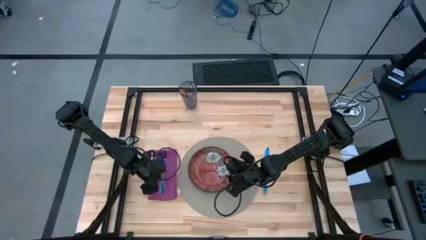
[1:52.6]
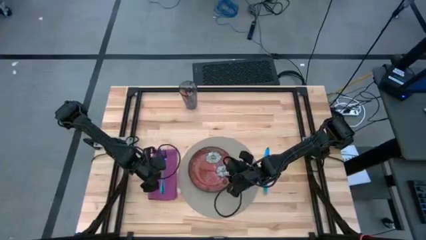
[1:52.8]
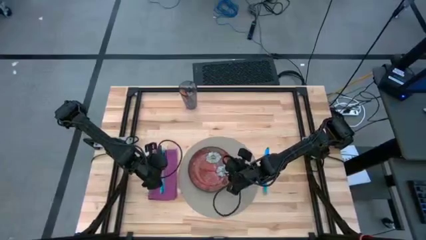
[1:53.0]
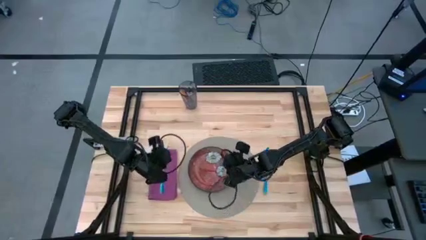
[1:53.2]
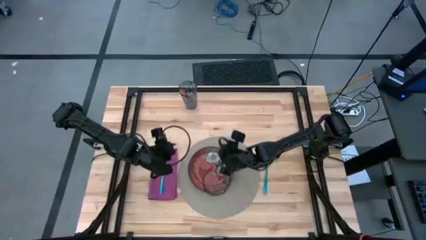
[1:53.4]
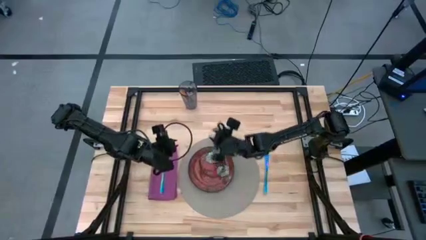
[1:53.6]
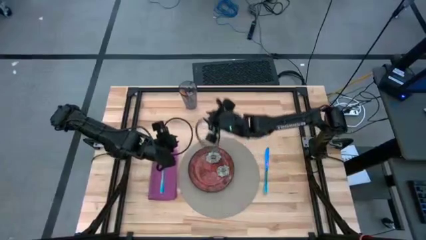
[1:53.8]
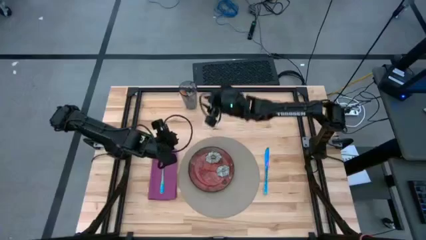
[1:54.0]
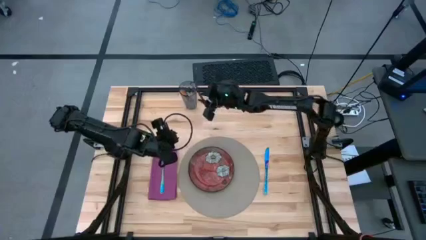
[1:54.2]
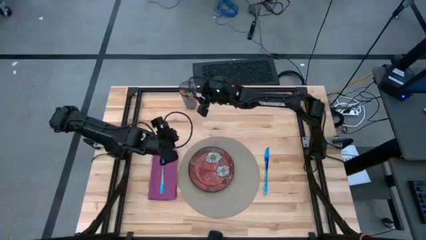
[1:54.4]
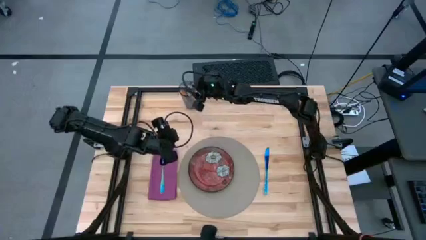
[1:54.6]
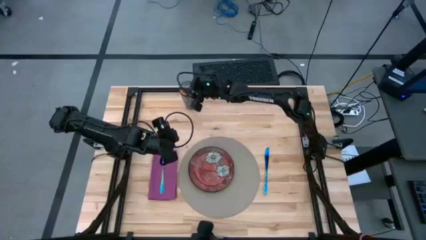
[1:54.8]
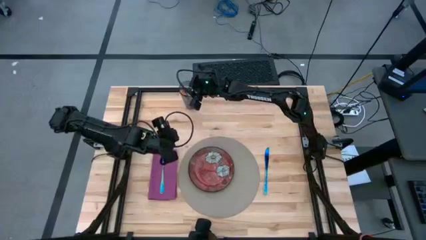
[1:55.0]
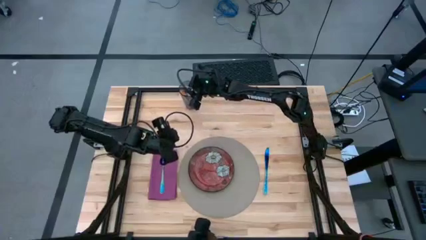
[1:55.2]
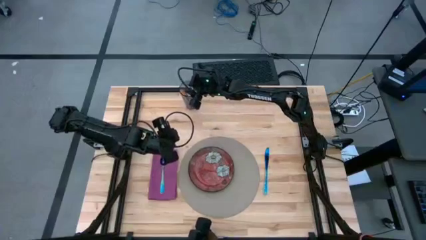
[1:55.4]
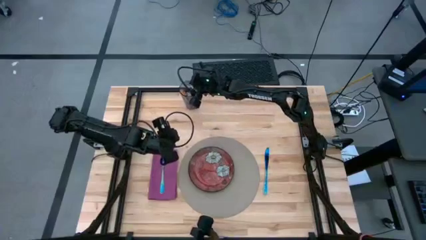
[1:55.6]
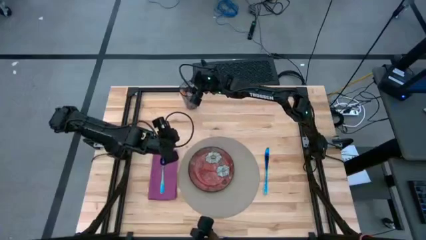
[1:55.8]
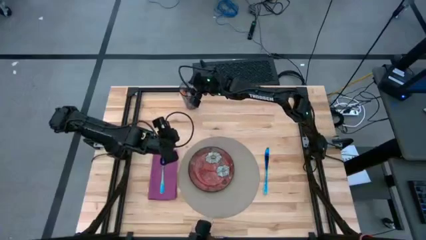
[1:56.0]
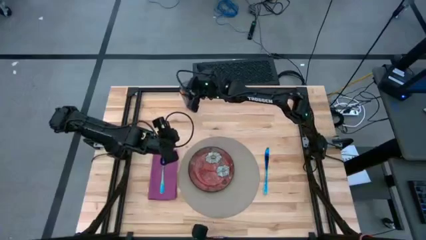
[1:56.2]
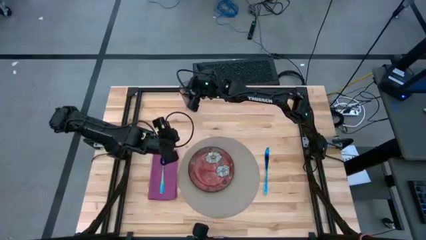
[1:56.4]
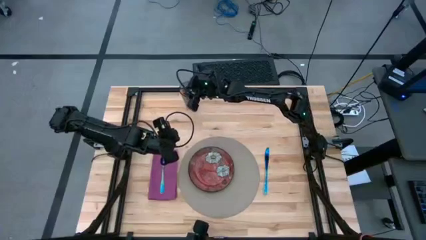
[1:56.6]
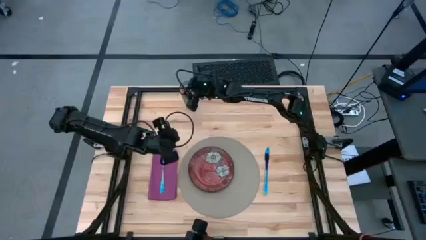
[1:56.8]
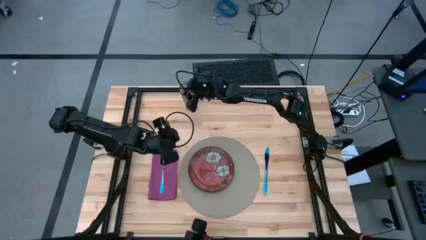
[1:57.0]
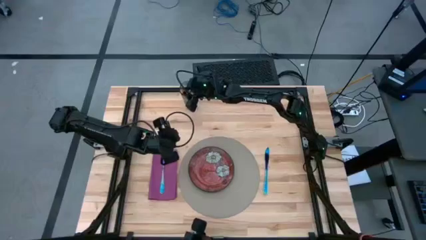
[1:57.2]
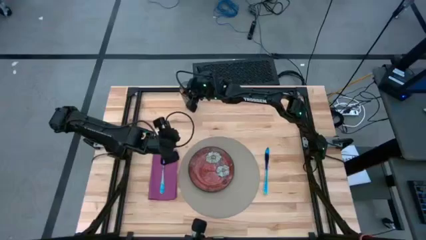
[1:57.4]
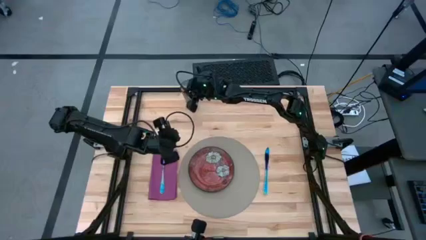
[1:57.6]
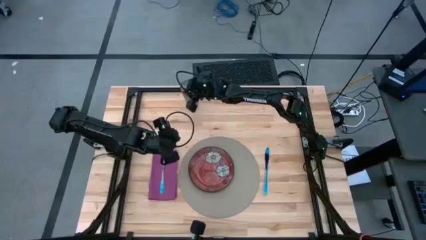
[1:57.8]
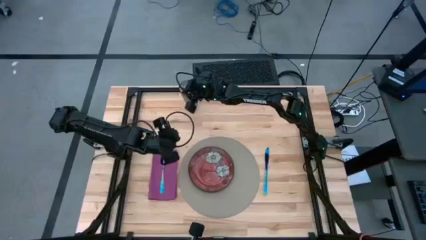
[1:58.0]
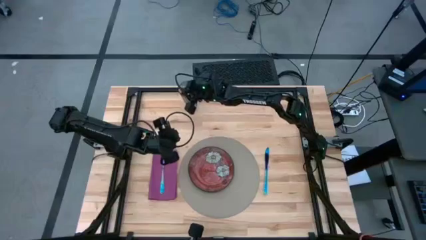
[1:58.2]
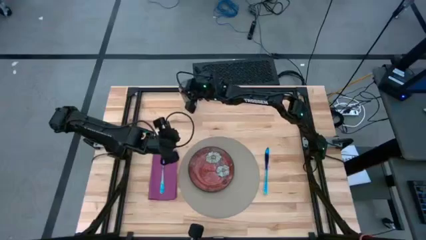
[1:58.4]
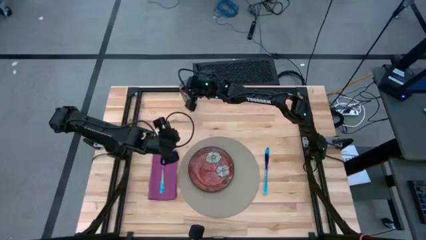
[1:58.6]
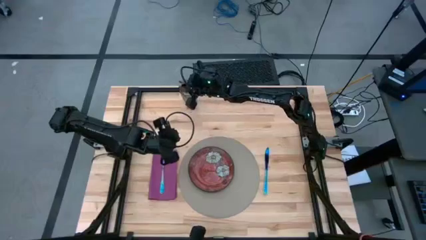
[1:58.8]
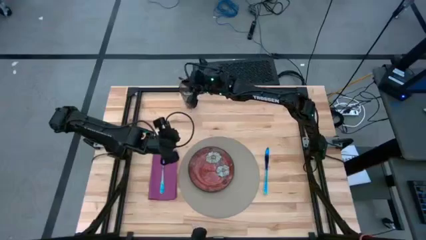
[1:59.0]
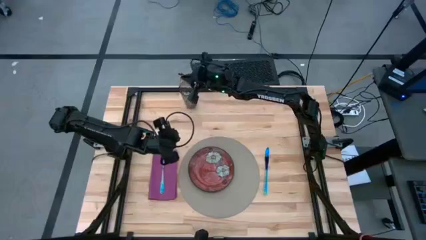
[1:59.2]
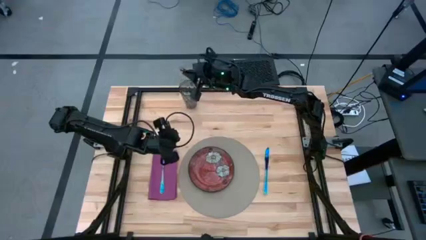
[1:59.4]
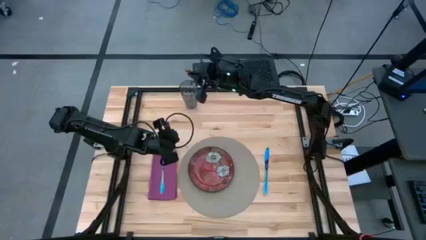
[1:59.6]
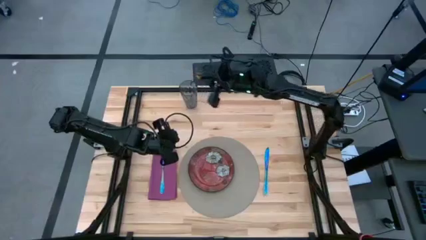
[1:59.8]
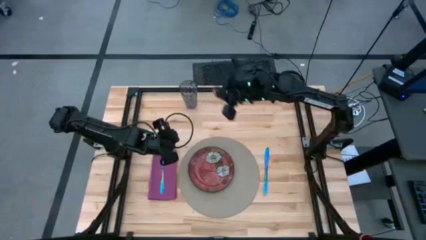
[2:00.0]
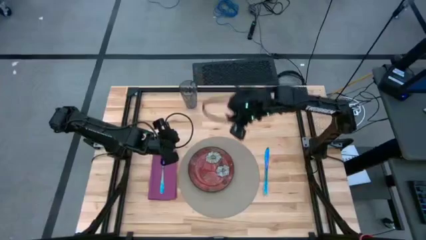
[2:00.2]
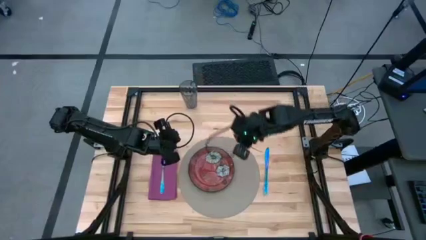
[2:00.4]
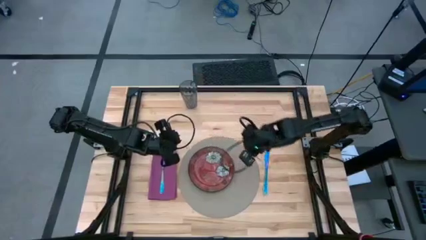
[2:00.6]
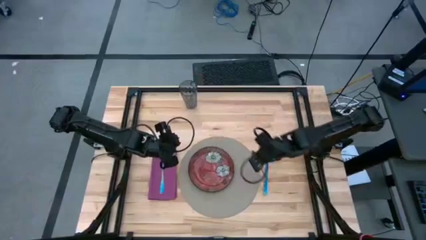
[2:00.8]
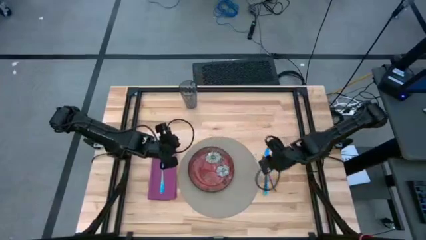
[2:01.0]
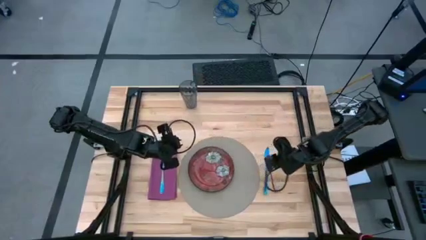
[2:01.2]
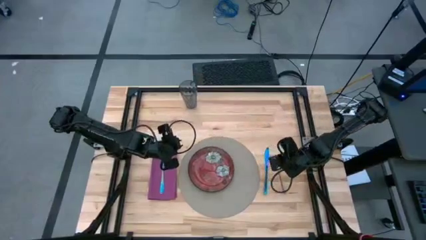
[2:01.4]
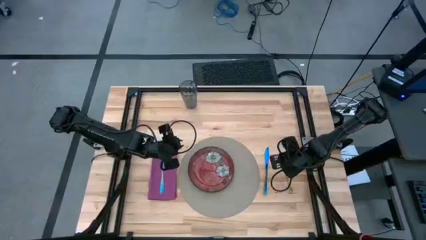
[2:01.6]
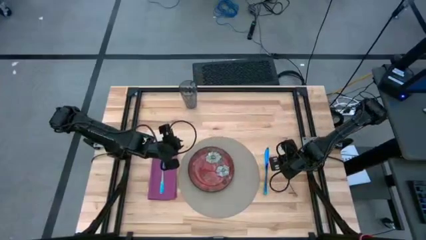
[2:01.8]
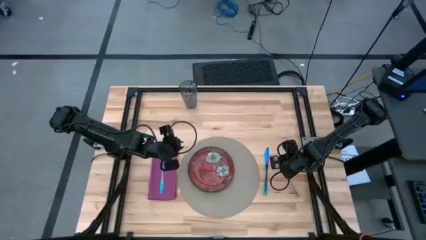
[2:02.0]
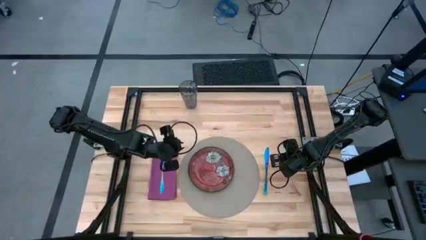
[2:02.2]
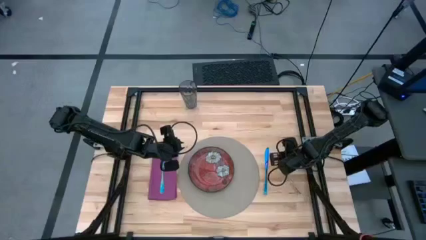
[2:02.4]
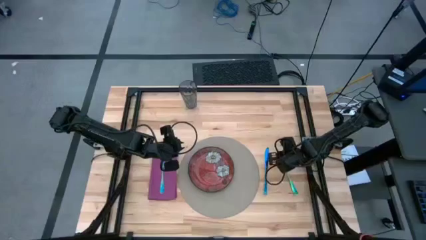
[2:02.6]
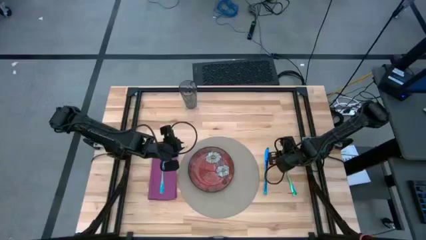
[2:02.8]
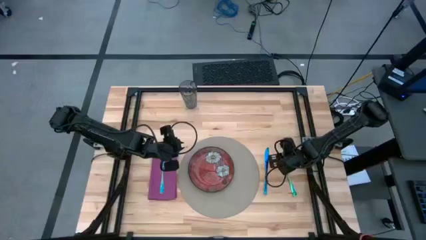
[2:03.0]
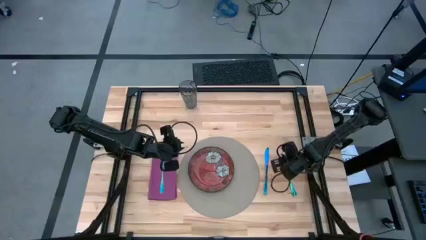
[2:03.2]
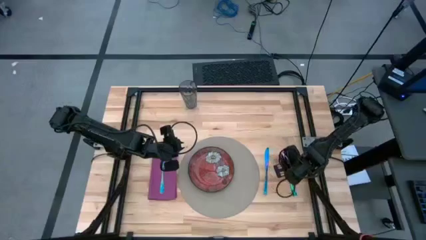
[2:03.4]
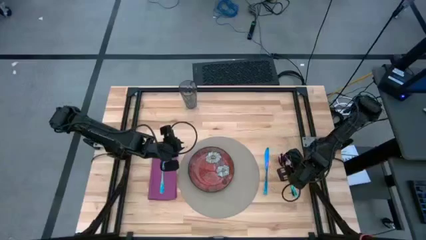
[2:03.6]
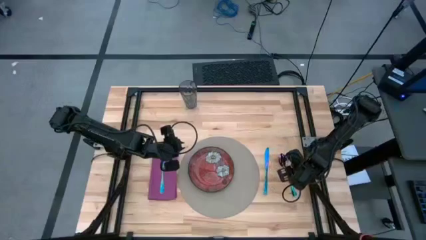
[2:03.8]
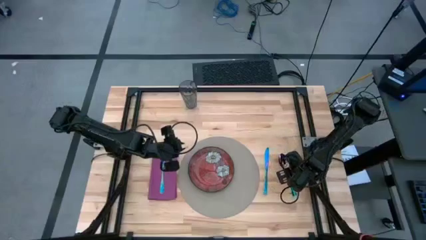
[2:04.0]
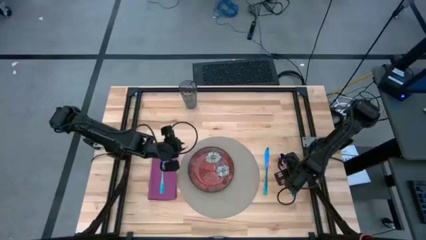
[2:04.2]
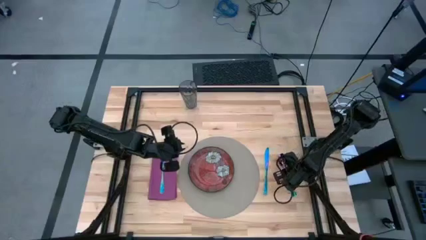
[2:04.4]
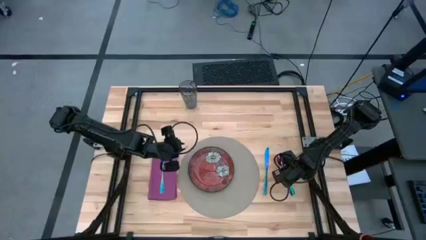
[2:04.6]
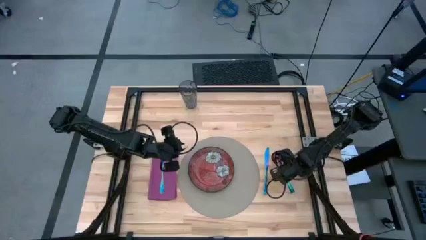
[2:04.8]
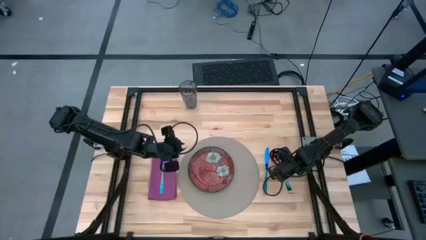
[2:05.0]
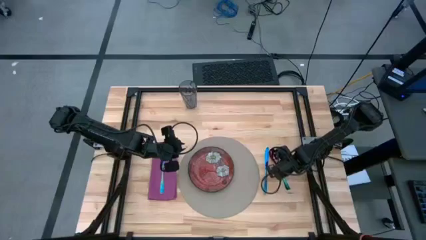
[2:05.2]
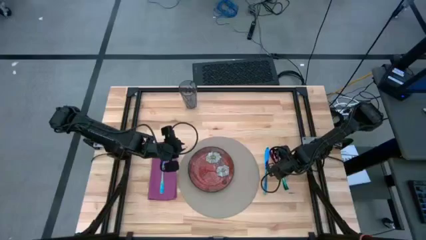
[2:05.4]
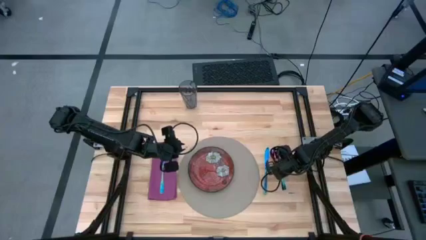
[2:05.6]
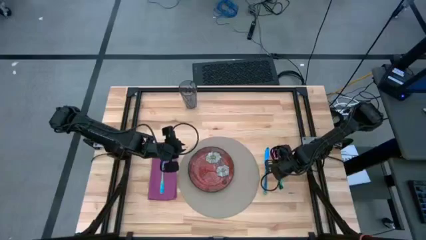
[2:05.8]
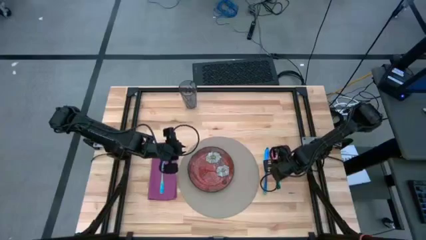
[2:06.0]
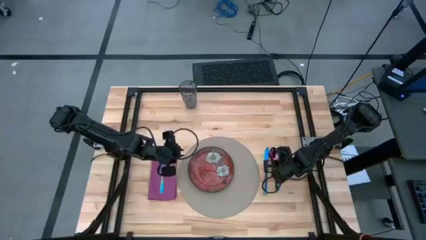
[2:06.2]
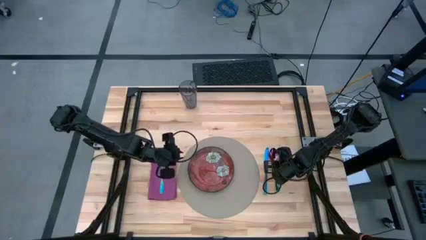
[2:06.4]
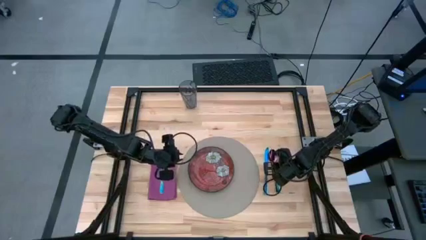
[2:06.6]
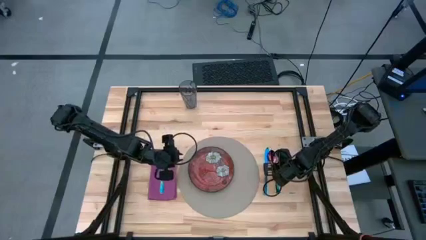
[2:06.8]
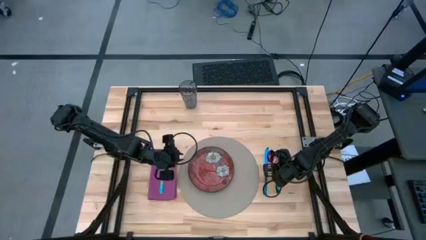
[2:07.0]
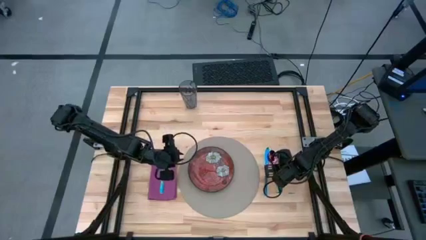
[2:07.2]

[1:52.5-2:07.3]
Task: Set table place
Put the blue spoon on the middle right of the table

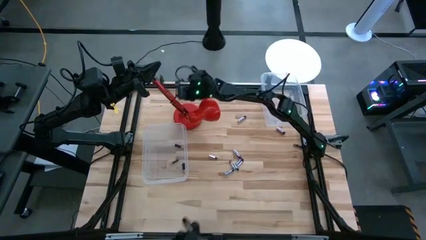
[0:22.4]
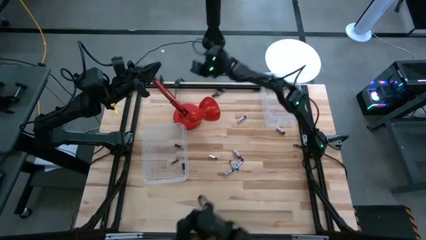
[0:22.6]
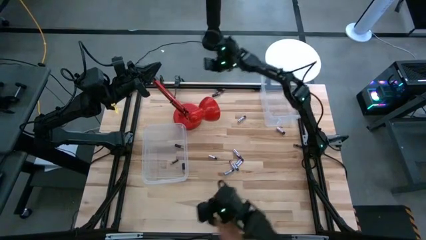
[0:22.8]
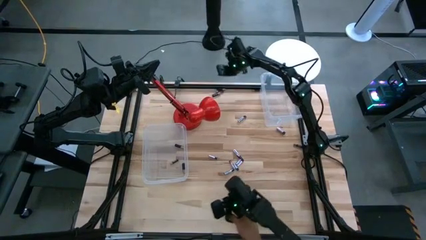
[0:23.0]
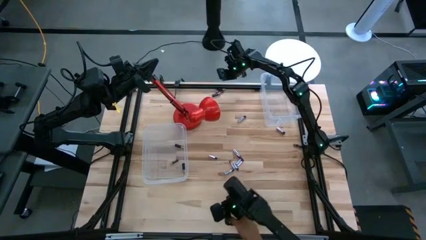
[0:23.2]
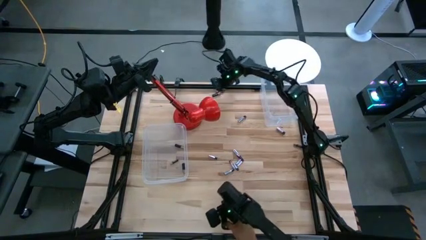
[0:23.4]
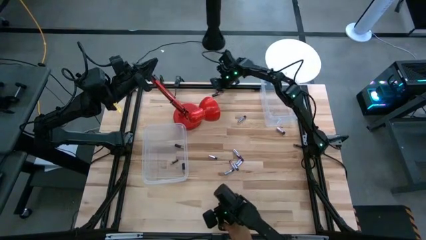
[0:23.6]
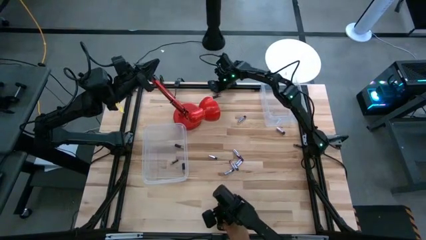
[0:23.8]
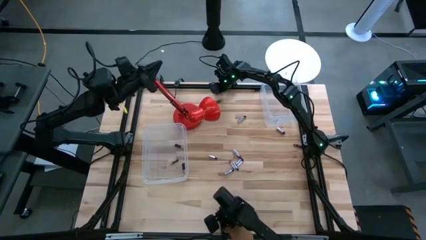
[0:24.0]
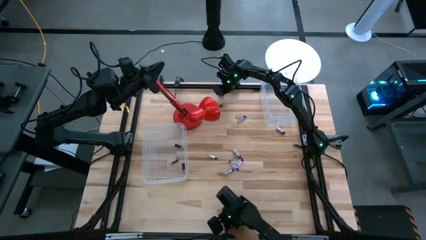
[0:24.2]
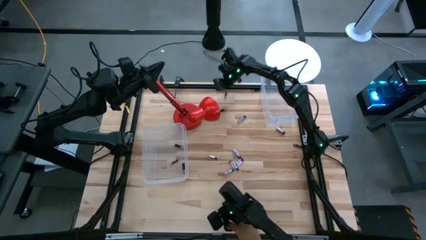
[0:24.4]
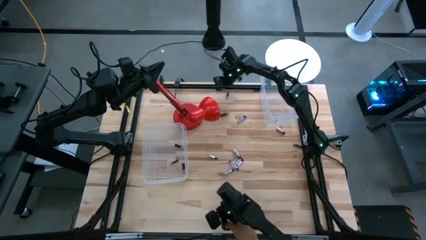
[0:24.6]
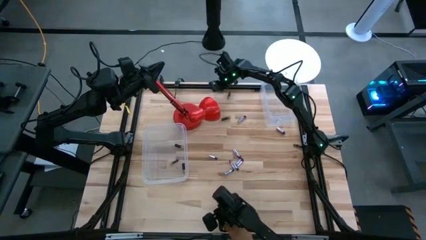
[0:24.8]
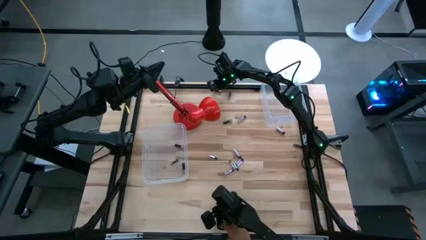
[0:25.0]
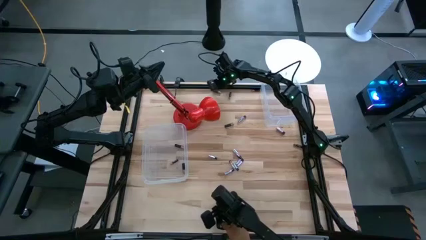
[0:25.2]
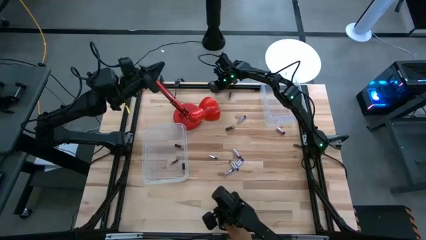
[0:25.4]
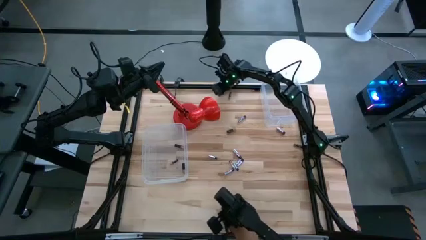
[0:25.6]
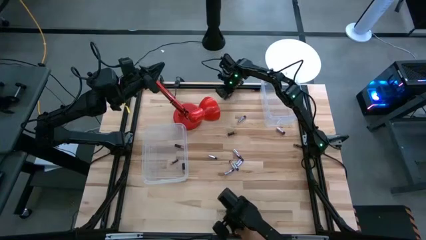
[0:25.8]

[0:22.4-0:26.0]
Task: Sort batteries
Move the black batteries to the top right of the table
